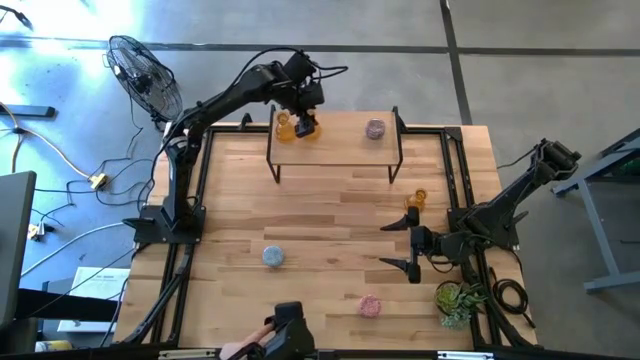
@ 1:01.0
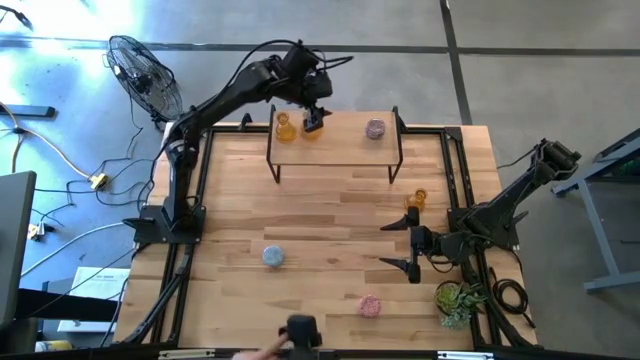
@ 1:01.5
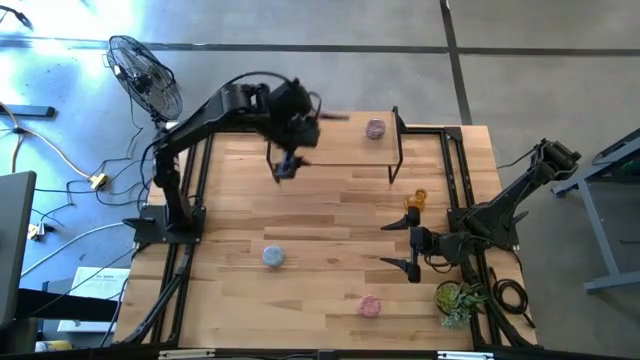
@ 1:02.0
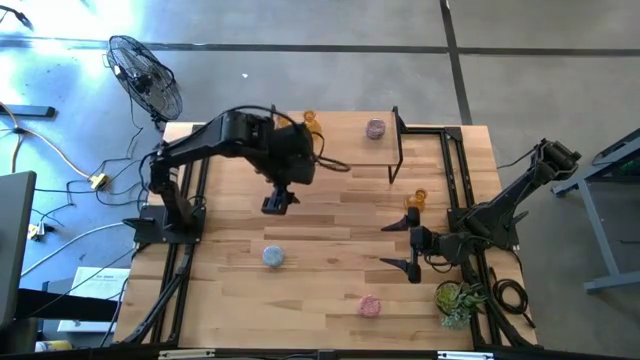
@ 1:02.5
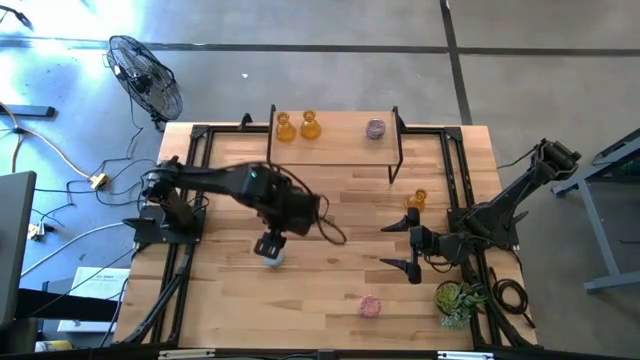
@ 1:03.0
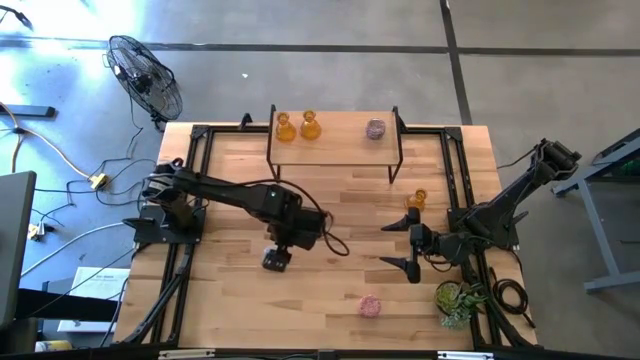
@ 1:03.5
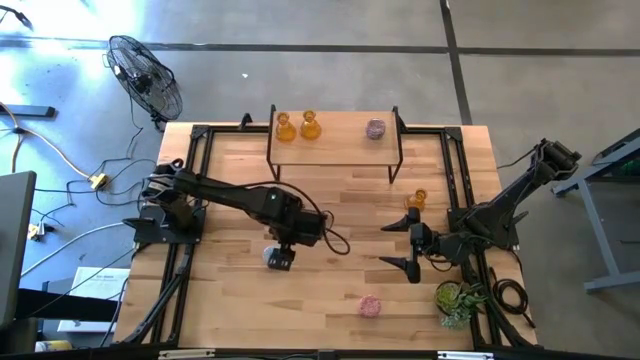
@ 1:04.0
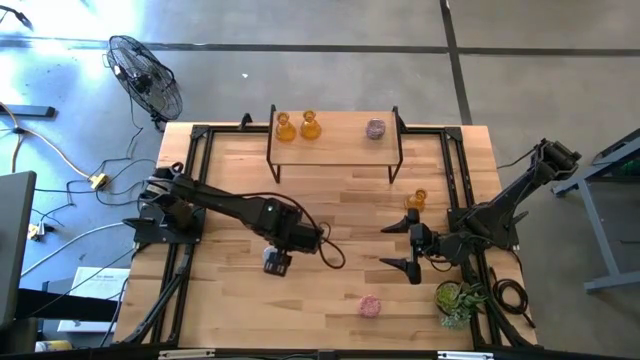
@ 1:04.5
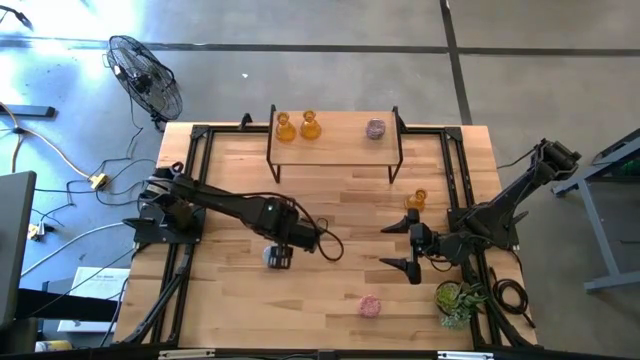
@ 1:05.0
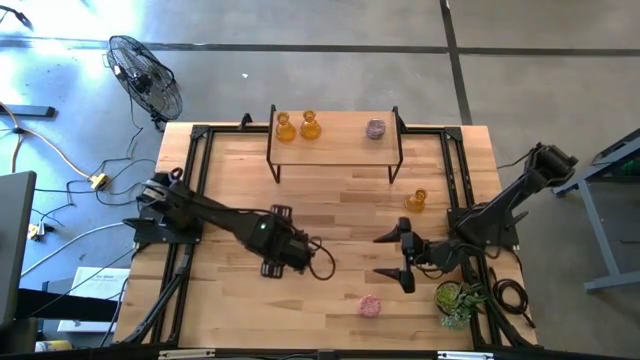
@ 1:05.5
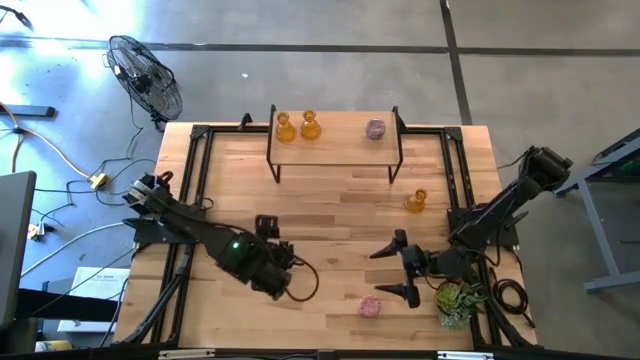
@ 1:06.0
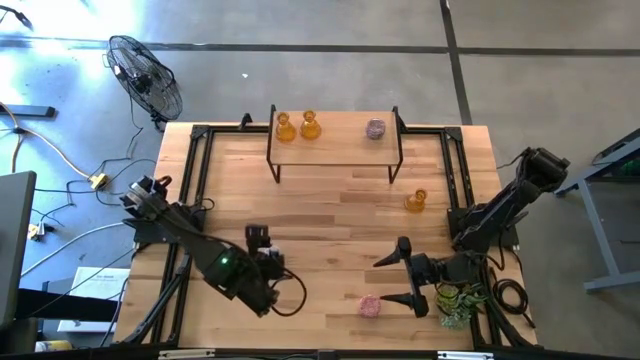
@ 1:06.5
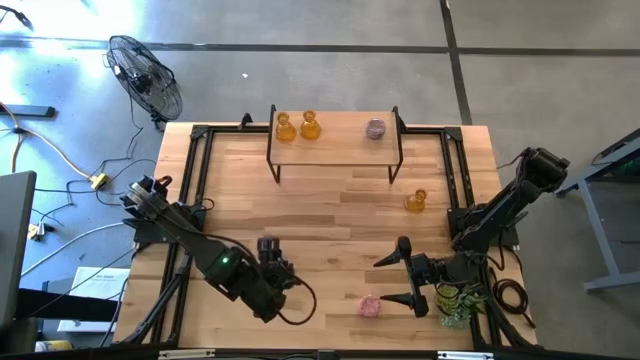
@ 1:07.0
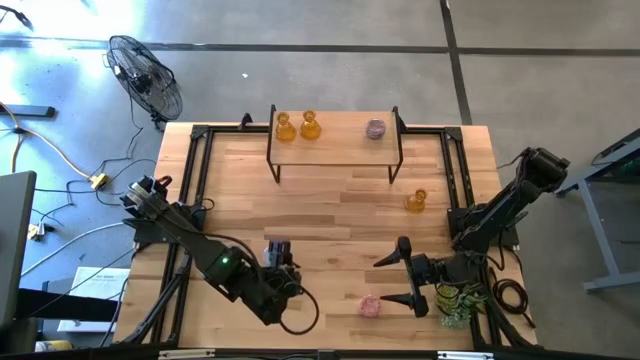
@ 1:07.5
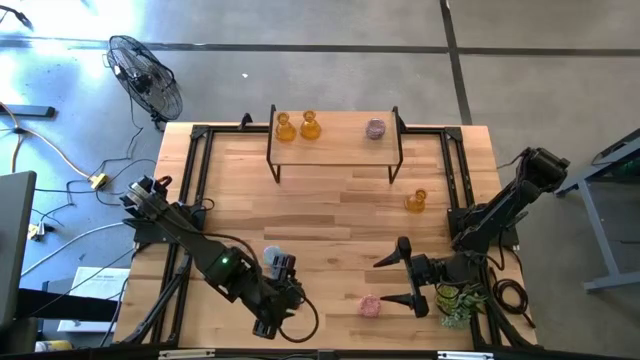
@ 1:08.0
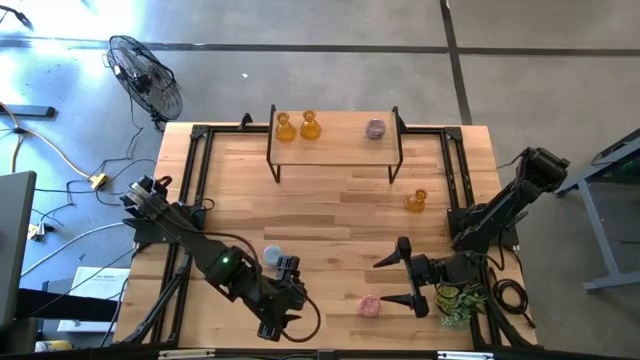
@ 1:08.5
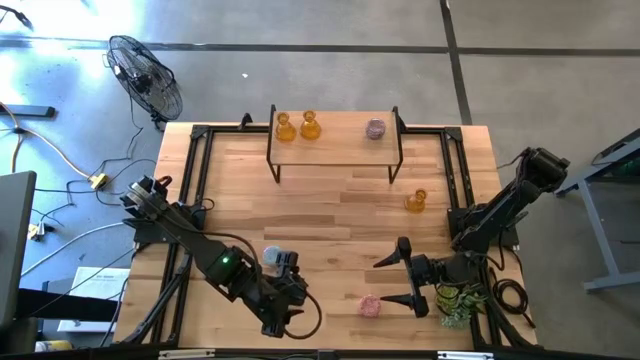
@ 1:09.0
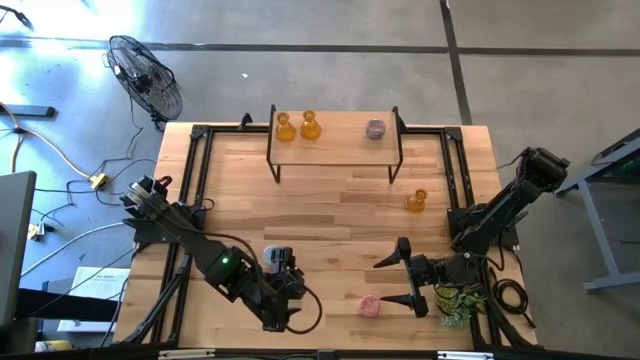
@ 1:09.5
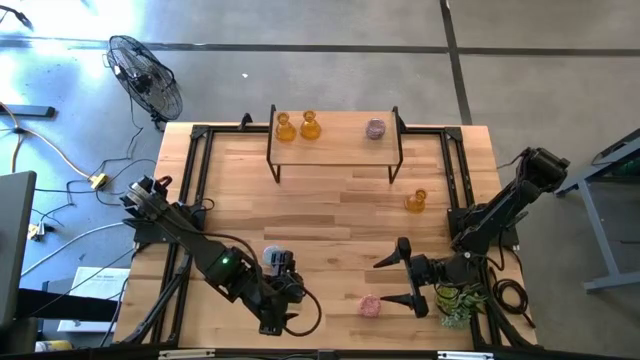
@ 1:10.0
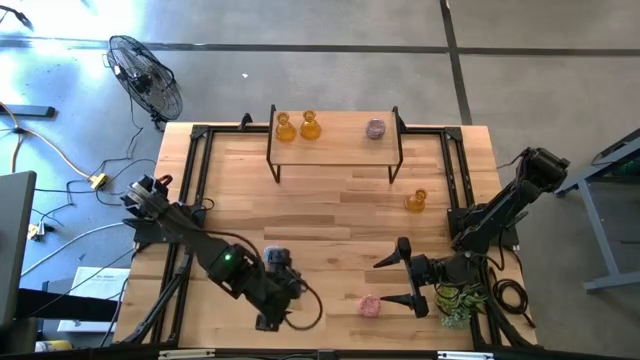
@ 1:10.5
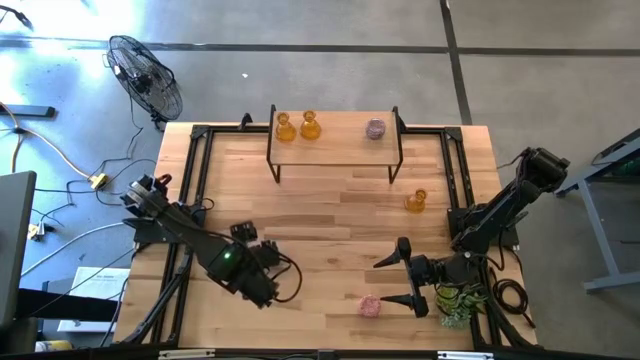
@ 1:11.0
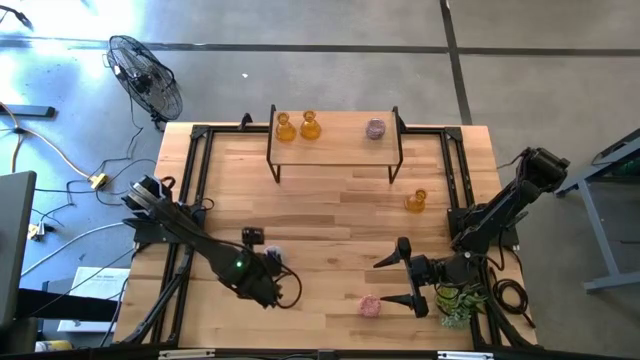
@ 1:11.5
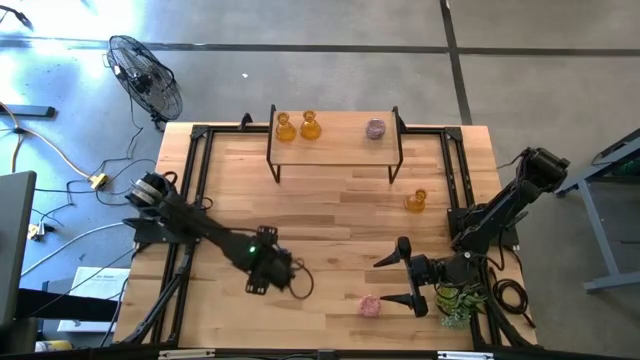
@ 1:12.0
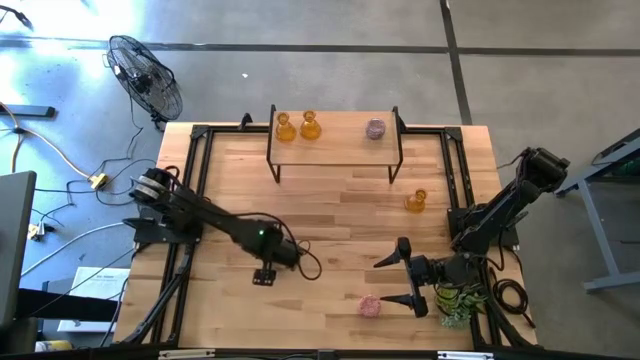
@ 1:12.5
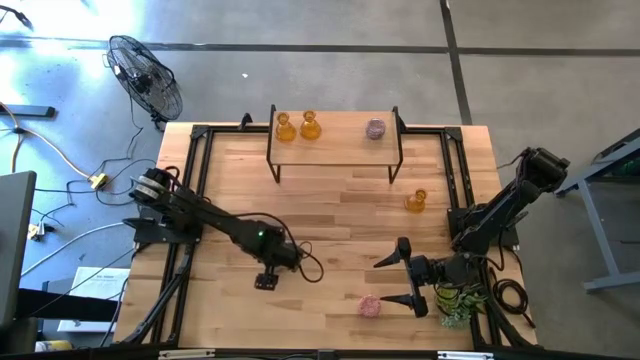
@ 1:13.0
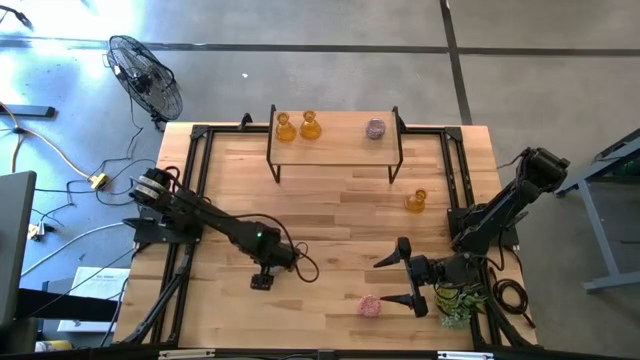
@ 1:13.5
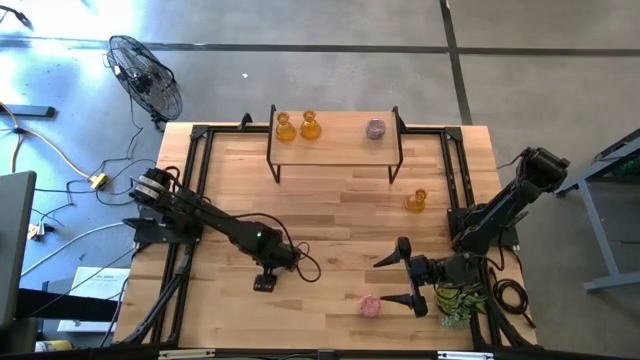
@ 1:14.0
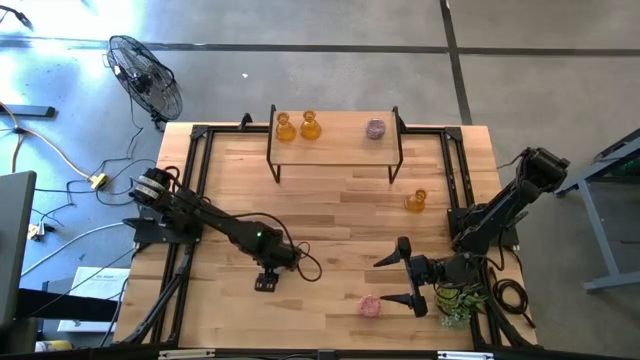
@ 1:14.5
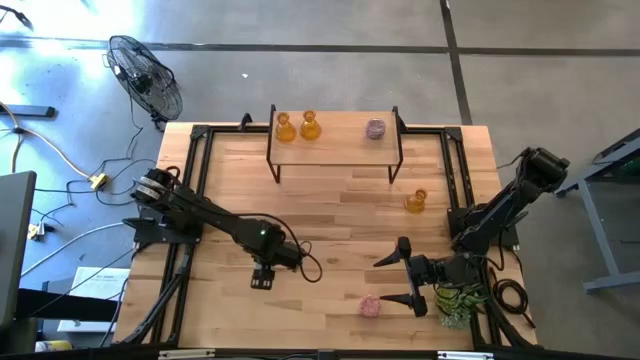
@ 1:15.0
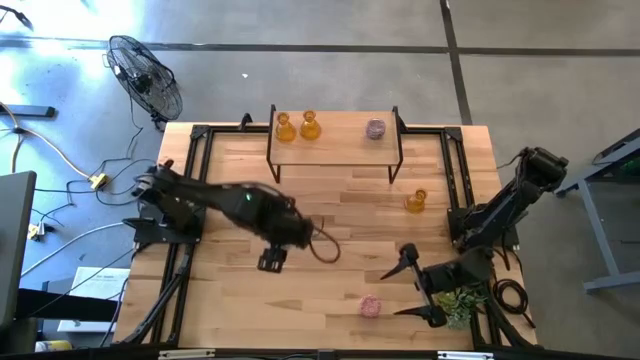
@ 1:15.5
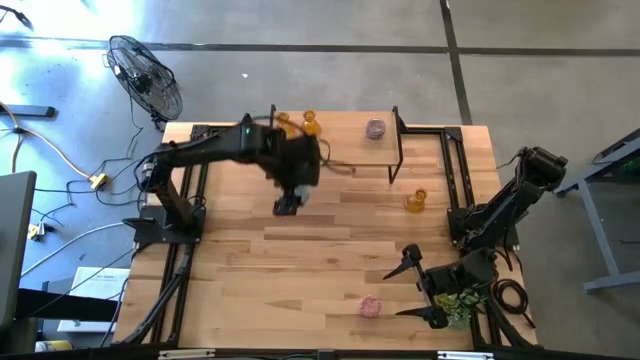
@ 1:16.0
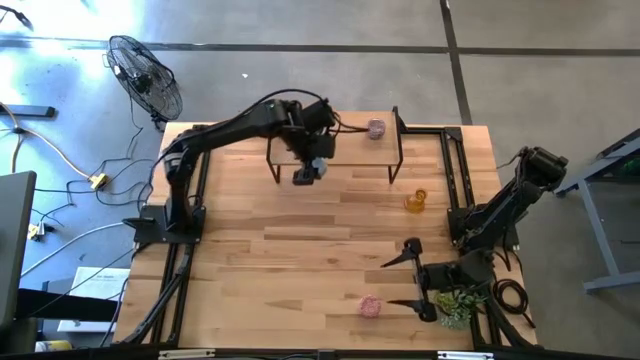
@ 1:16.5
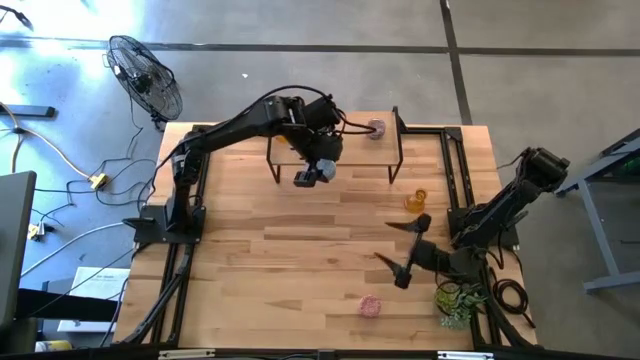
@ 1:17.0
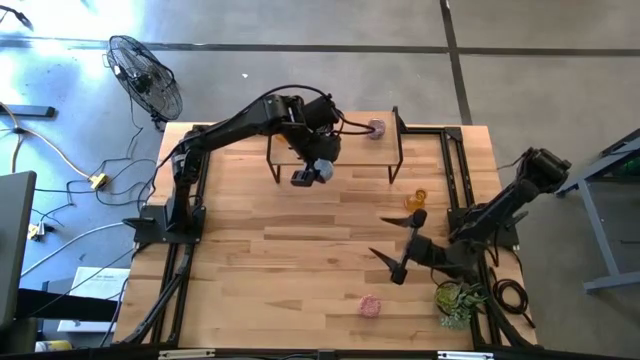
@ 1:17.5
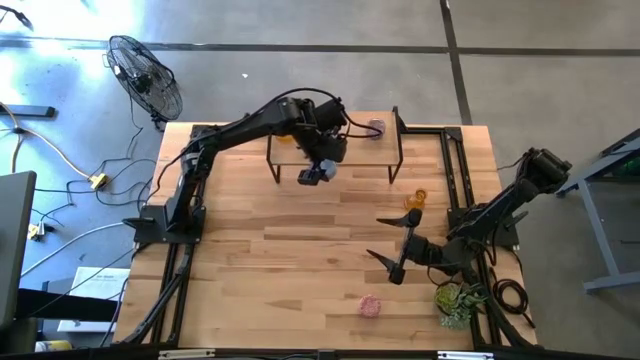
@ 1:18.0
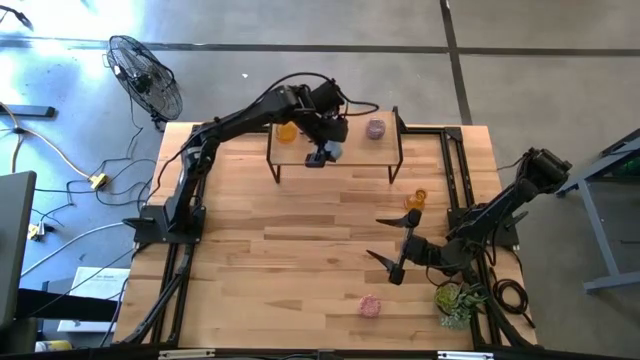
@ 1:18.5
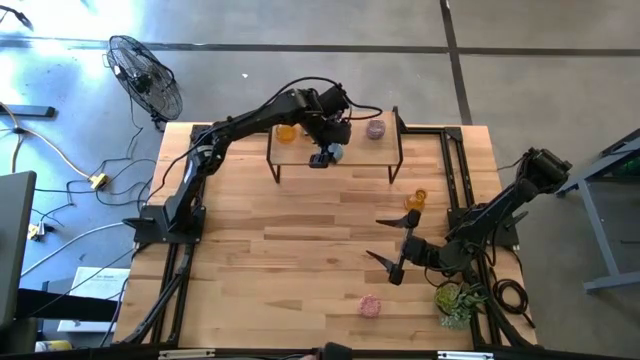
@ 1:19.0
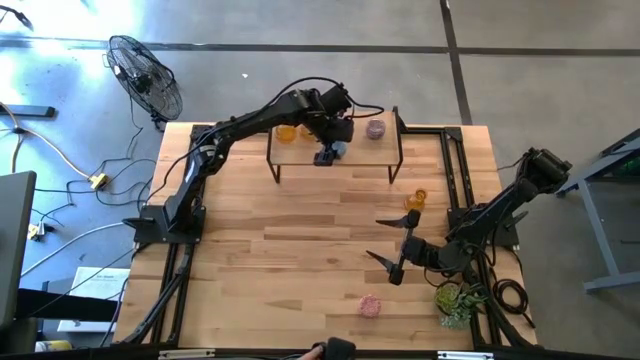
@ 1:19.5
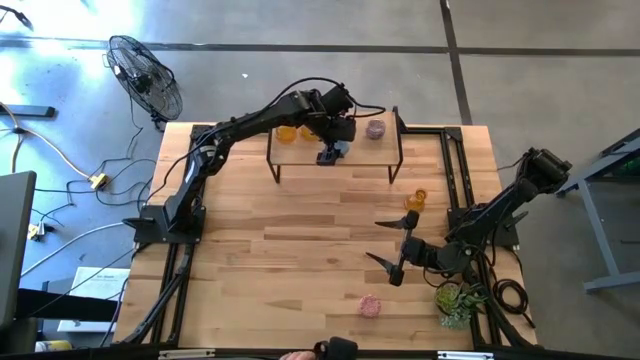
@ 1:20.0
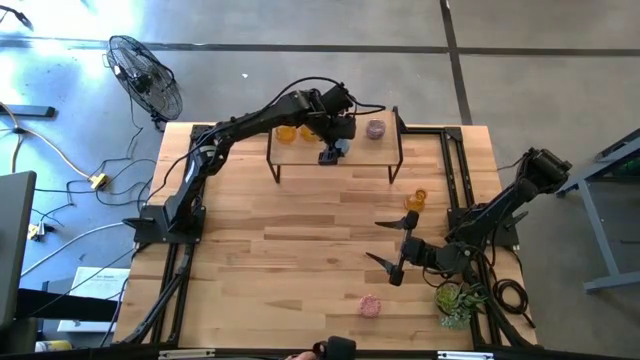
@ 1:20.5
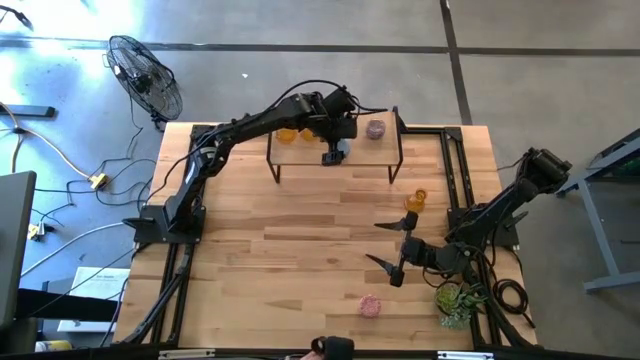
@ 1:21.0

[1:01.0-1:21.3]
Task: Pick & Place candle stick holders
Put the blue white scented candle on the shelf

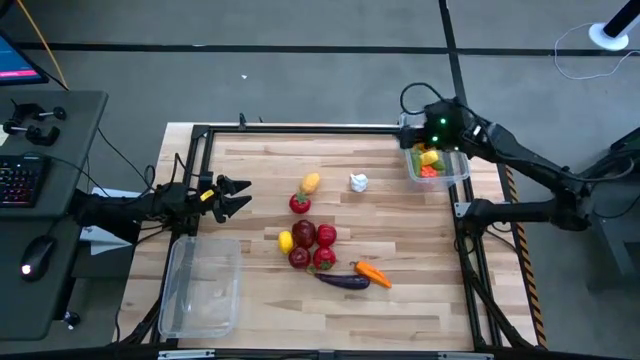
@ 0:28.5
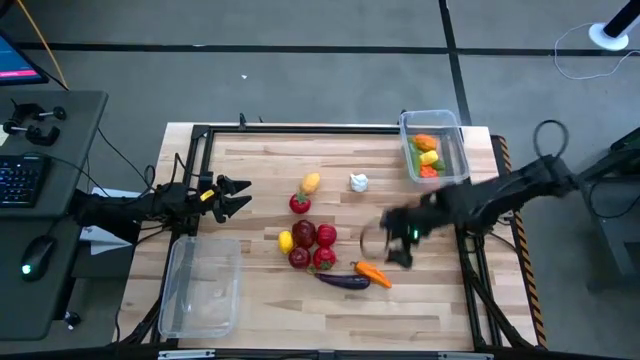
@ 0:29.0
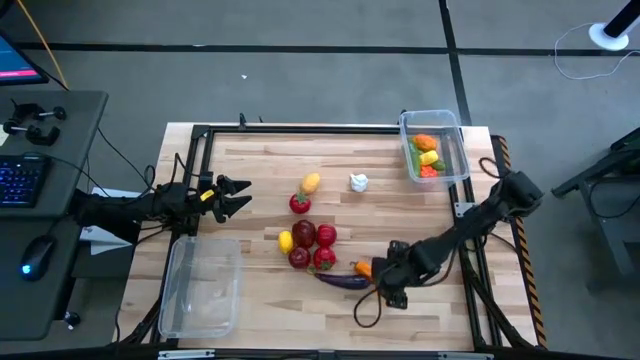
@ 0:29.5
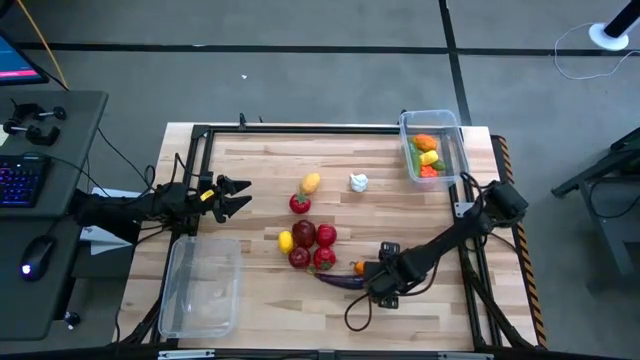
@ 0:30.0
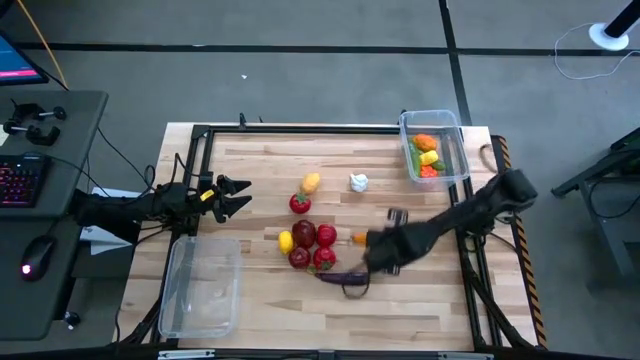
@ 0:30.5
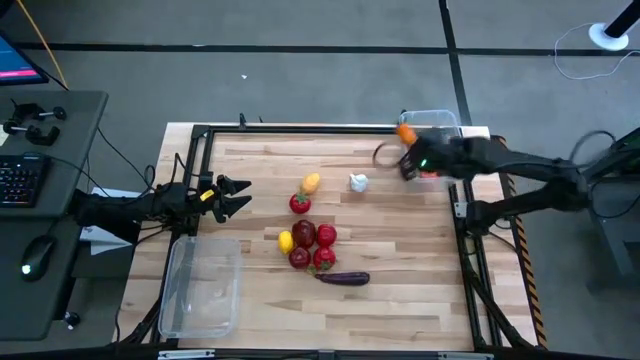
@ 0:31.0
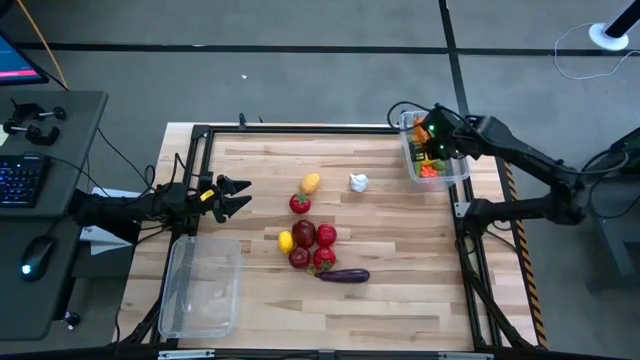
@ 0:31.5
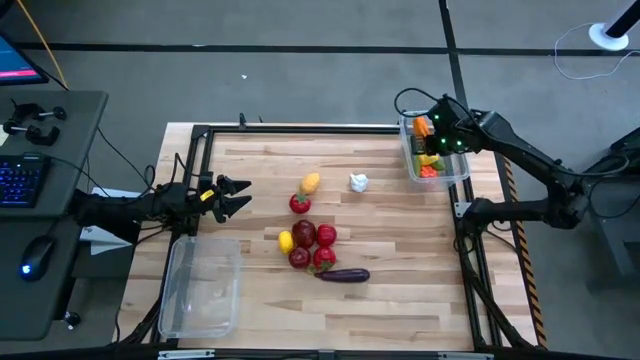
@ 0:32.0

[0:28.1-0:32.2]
Task: Sort produce into baskets
Put the orange chili pepper into the top transparent bin
